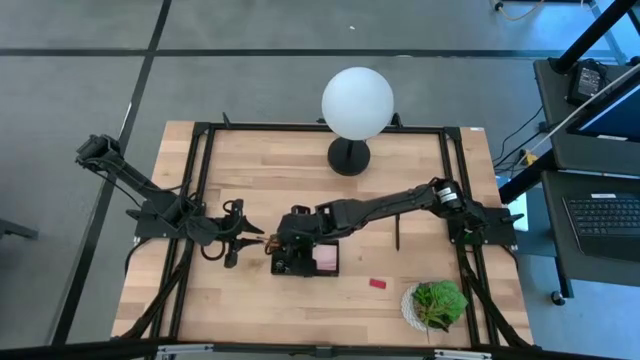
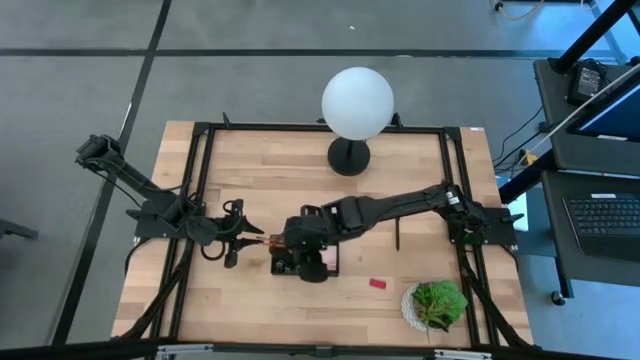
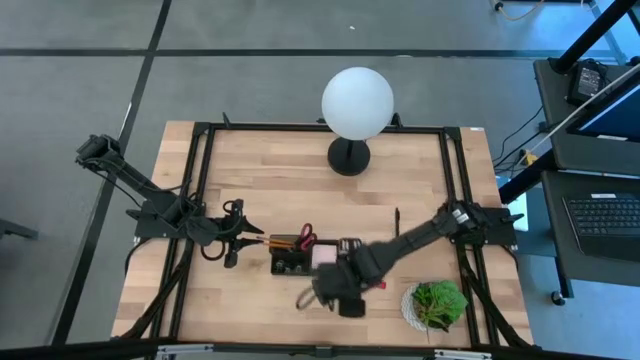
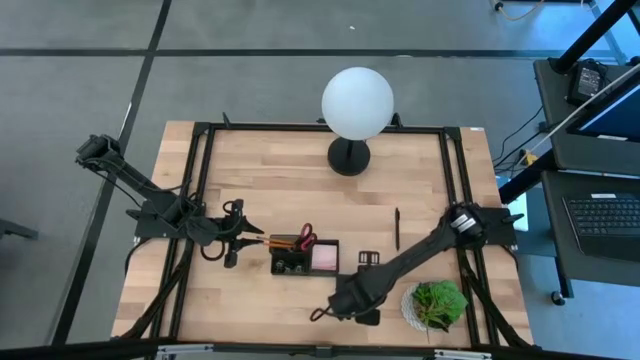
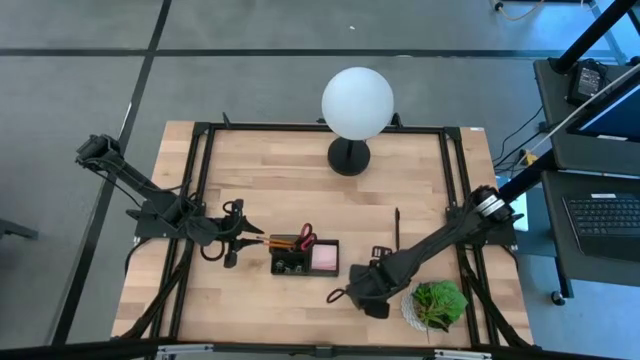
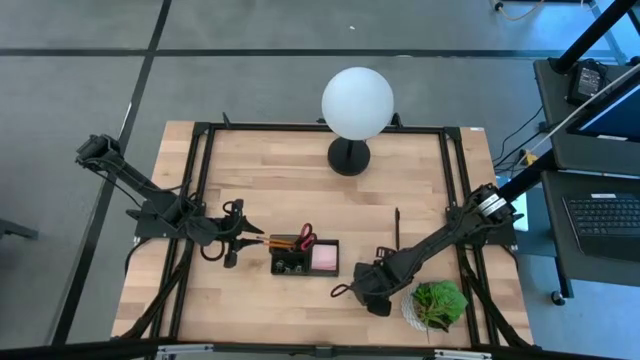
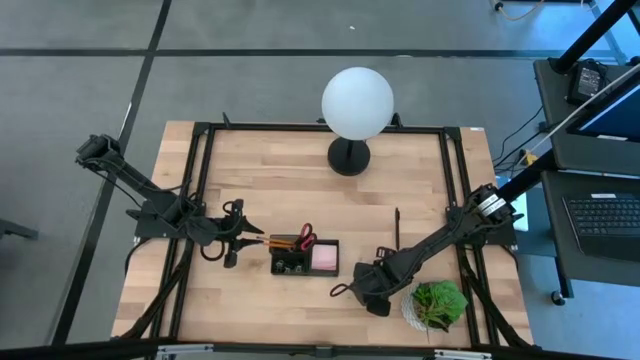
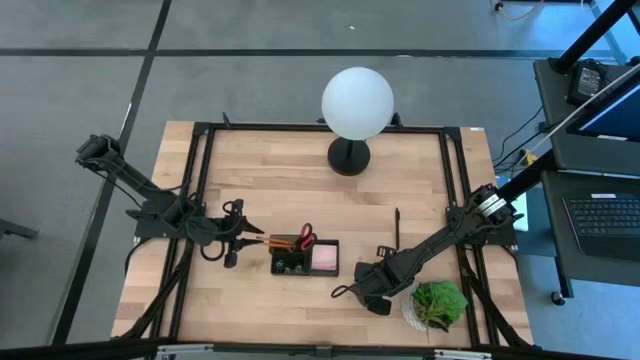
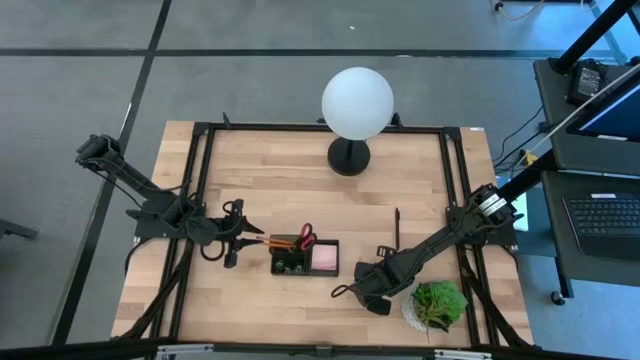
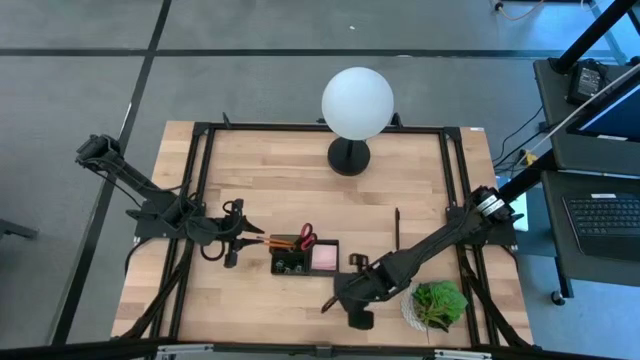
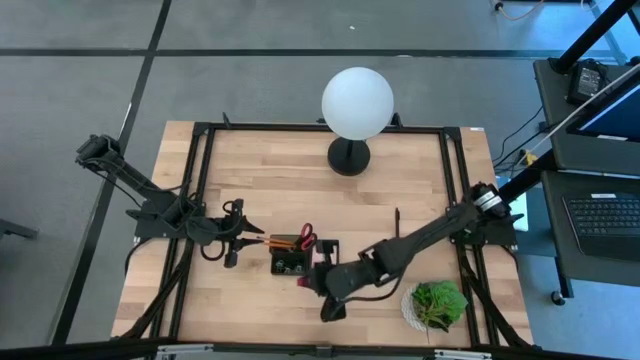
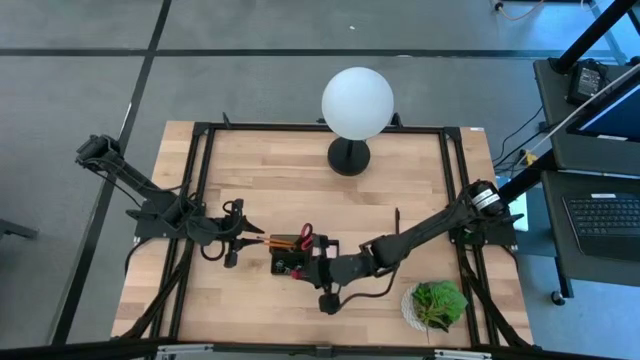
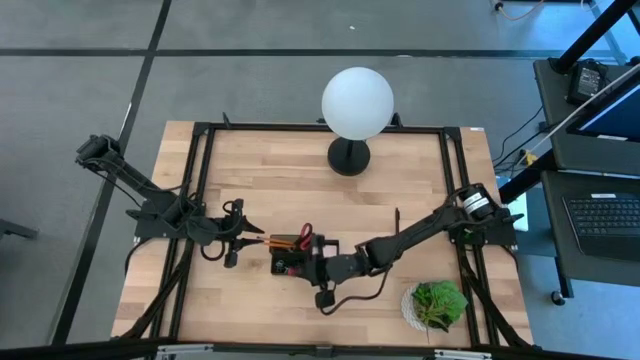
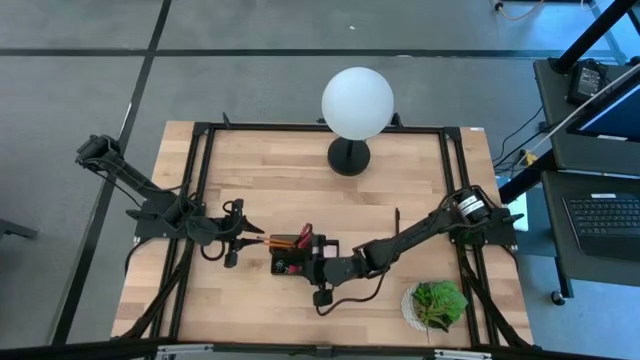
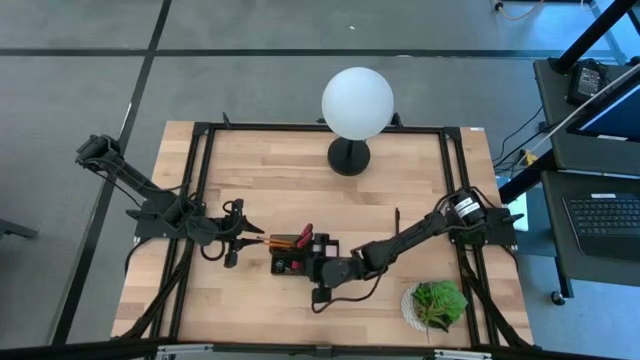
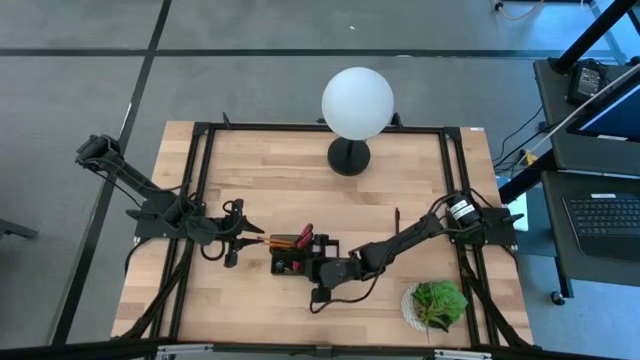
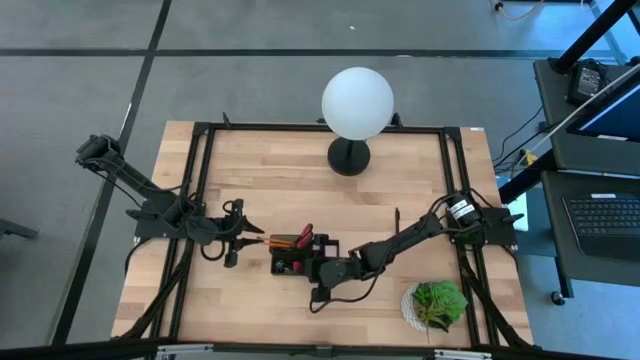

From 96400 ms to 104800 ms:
Task: Pick and place office supplies into organizer
Put the red eraser into the black desk organizer

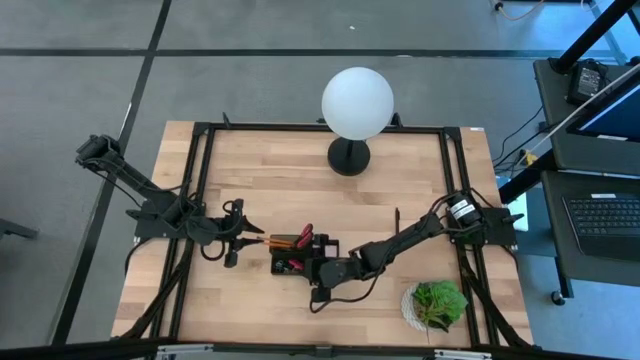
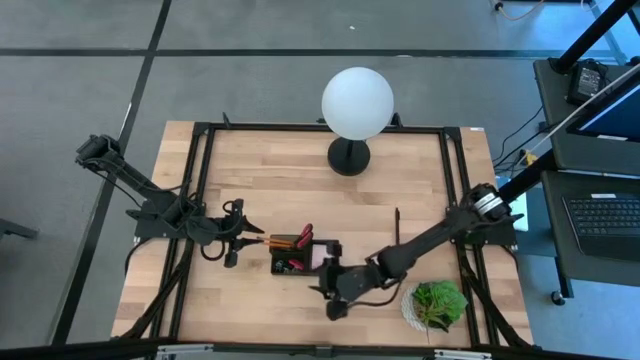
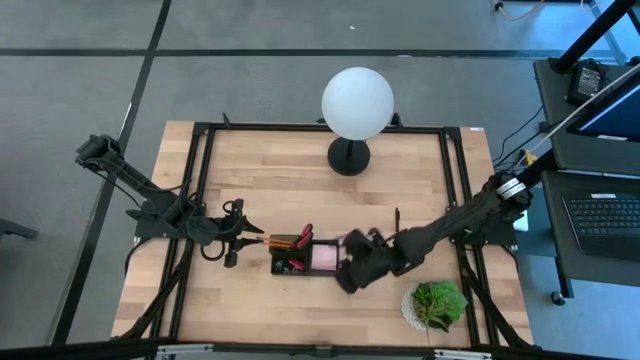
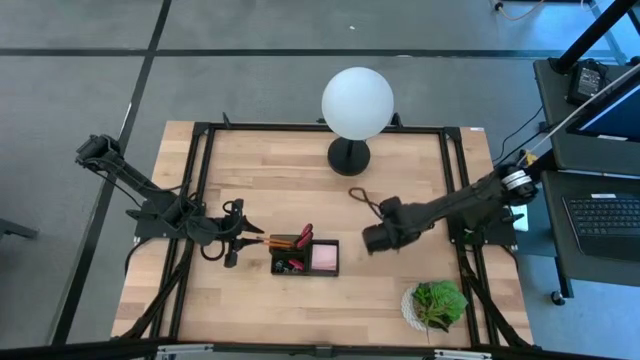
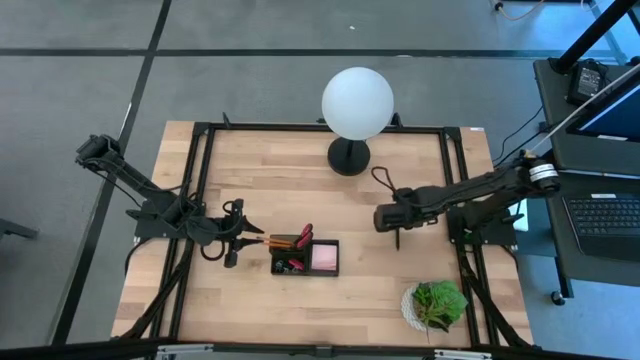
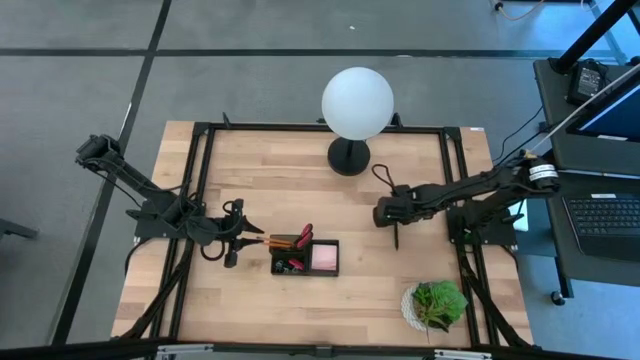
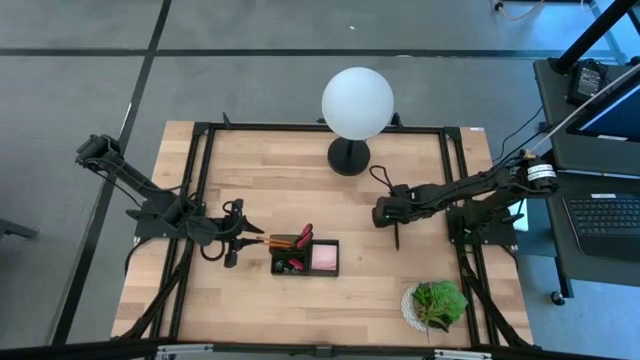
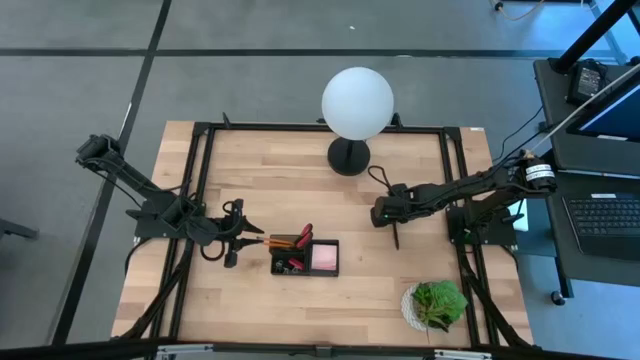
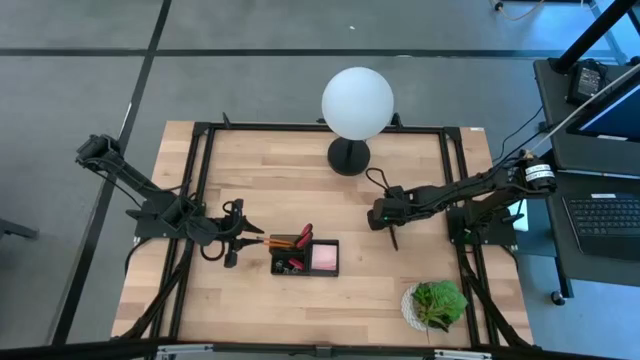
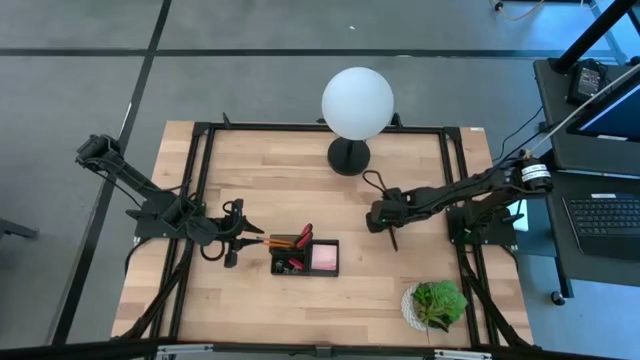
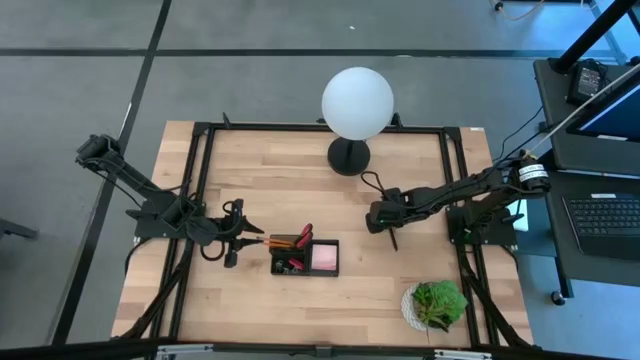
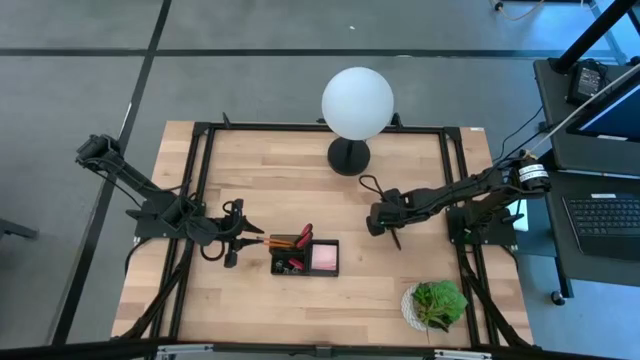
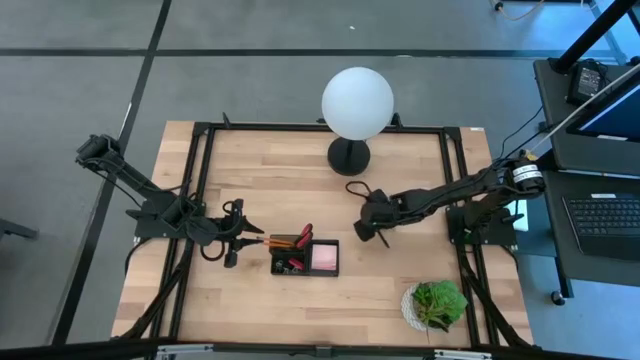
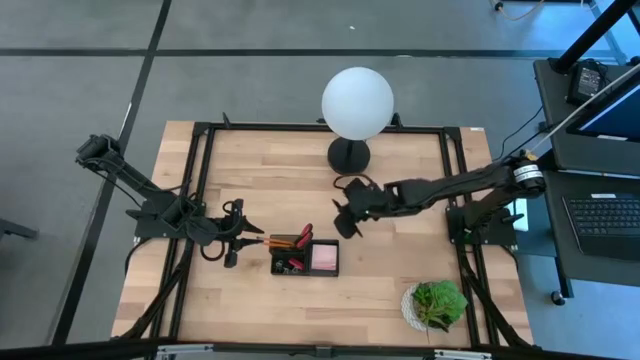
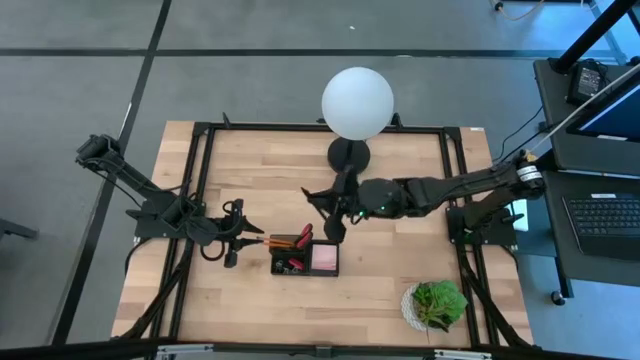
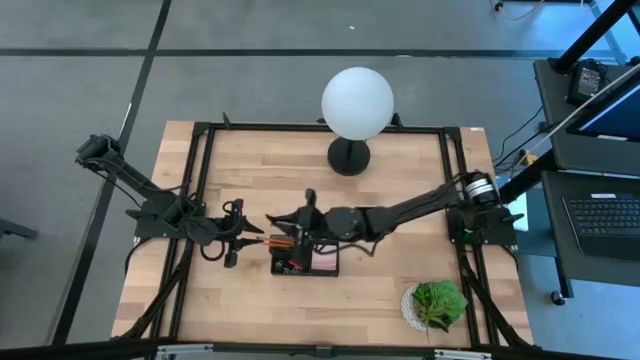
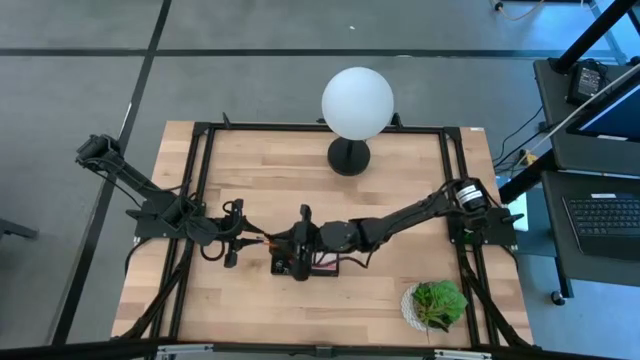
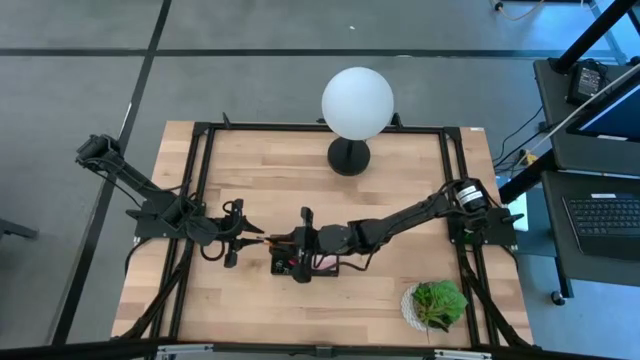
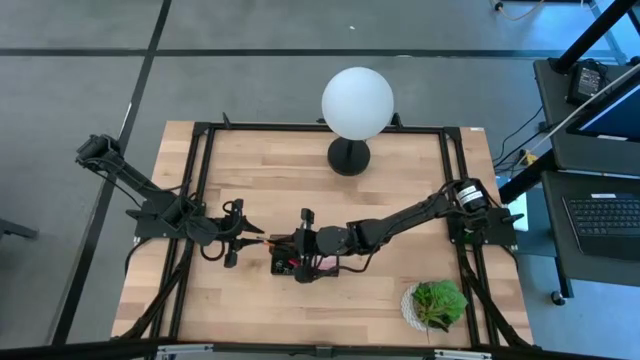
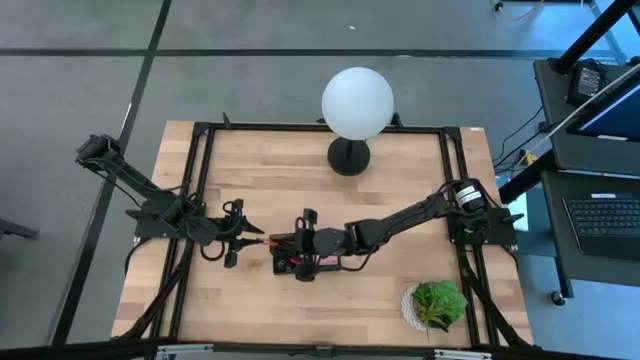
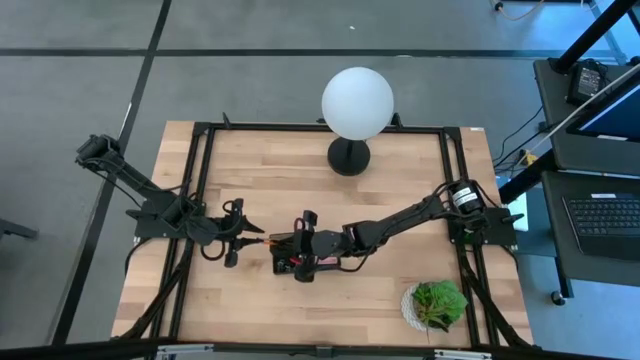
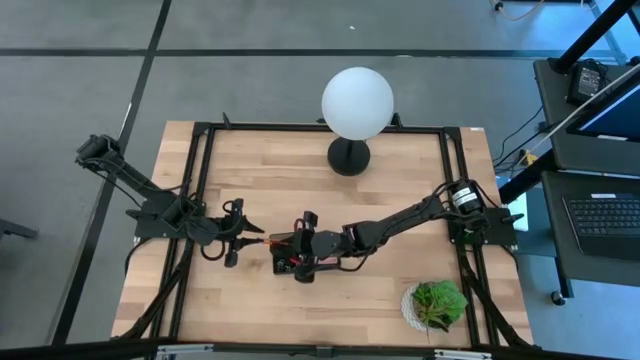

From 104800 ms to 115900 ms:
Put the black pen into the black desk organizer

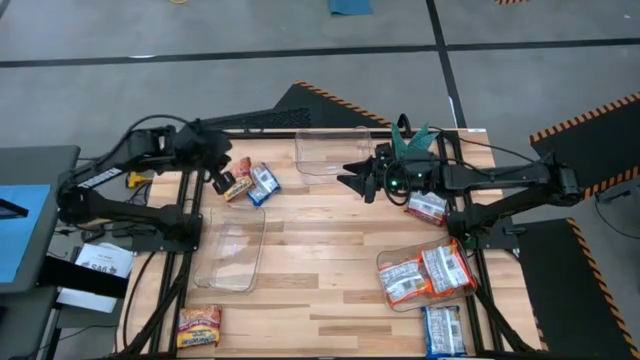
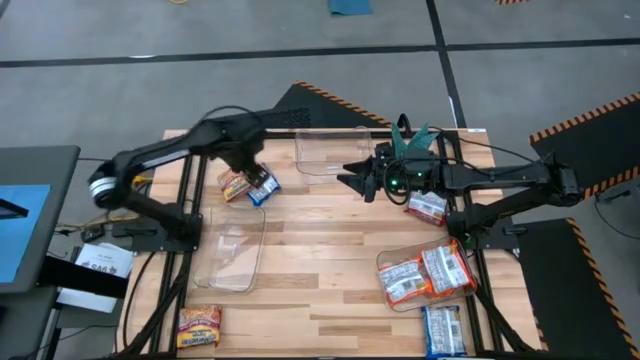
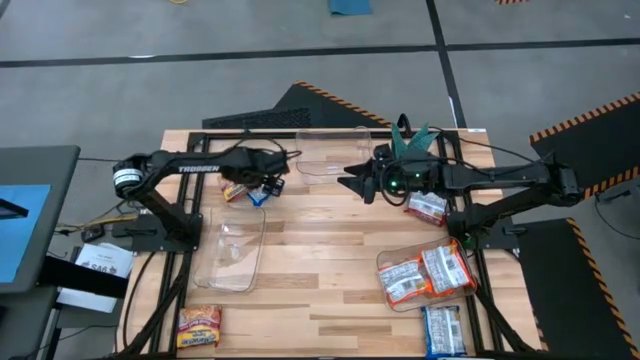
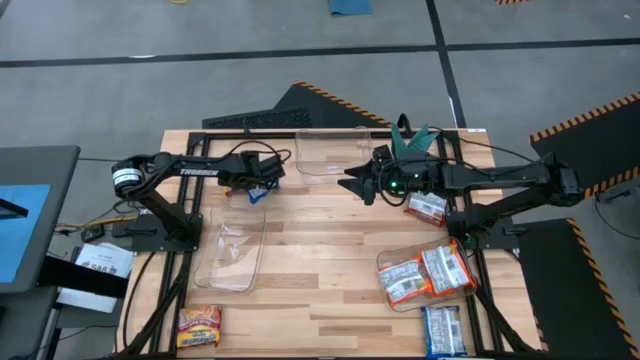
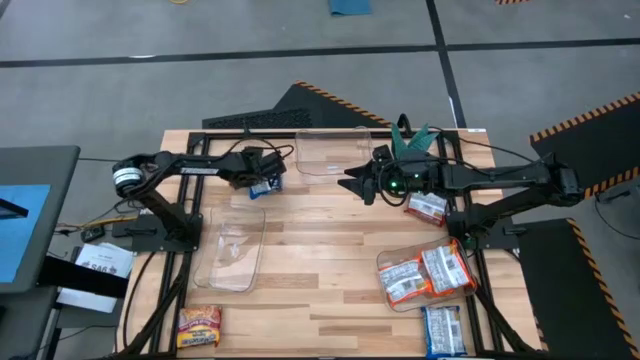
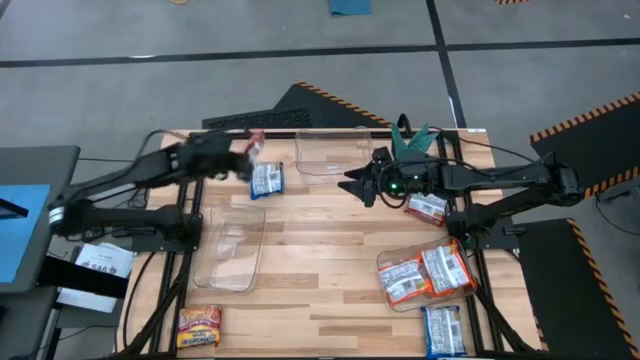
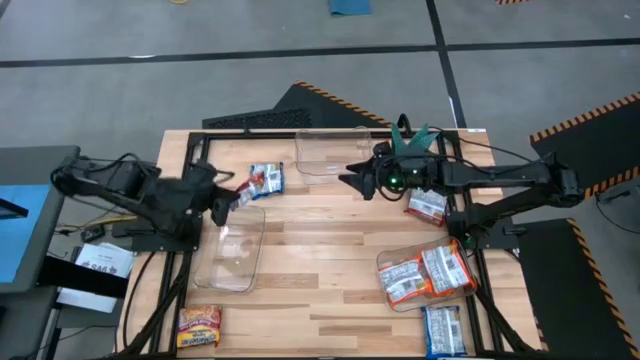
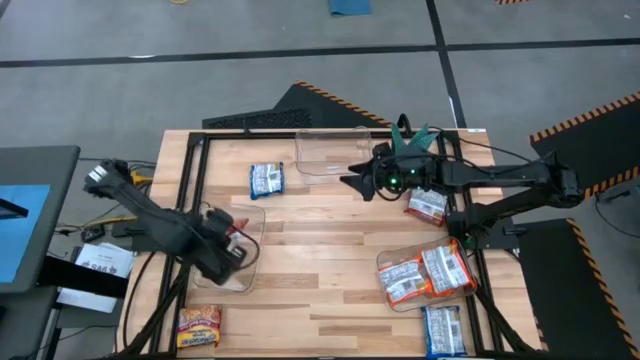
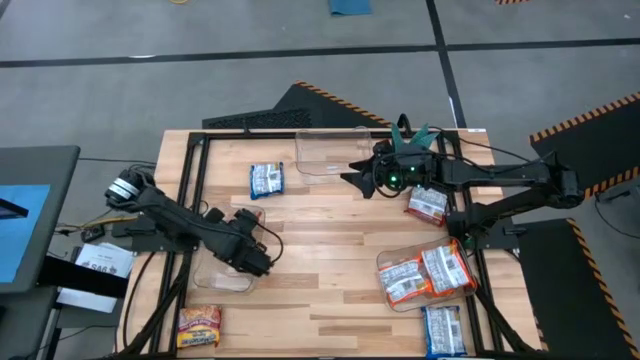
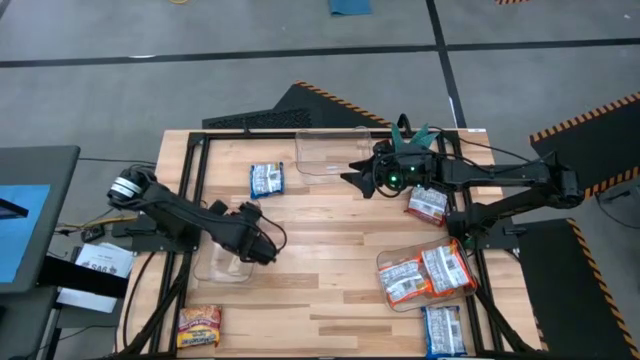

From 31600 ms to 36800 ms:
Task: Sort Maruchan noodles
Put the top left red noodle pack into the bottom left transparent bin
